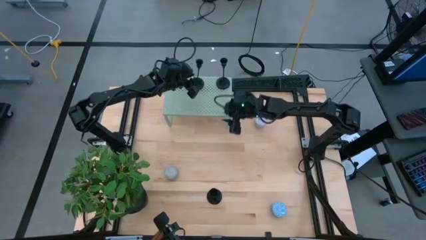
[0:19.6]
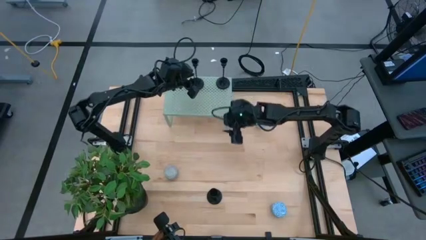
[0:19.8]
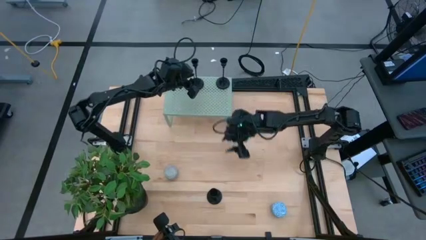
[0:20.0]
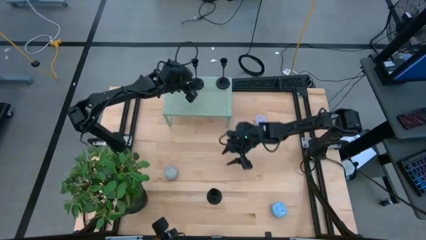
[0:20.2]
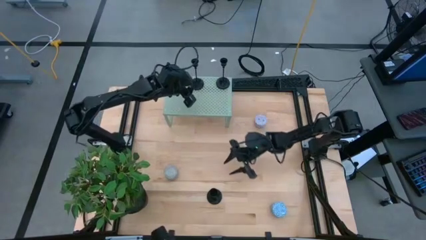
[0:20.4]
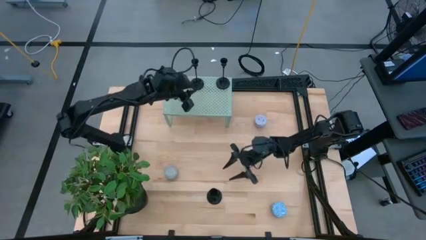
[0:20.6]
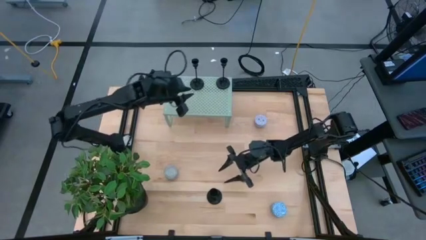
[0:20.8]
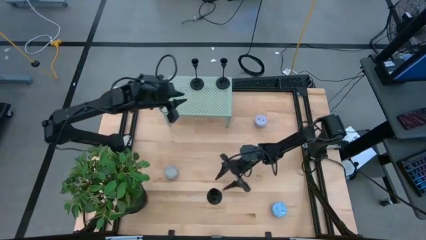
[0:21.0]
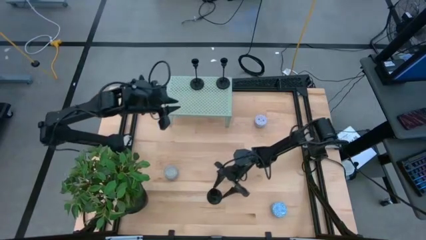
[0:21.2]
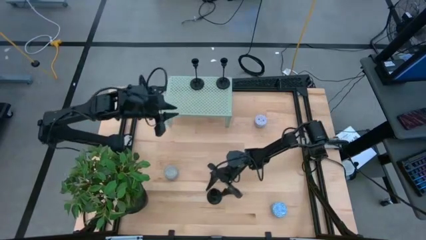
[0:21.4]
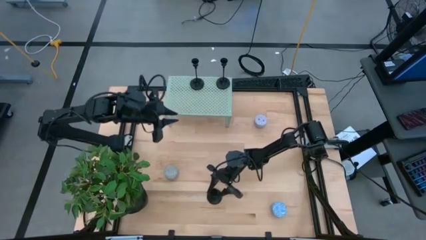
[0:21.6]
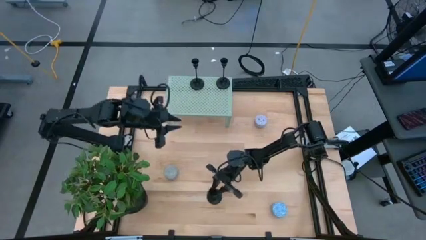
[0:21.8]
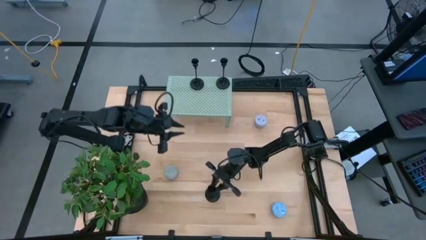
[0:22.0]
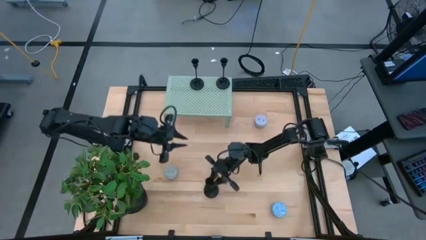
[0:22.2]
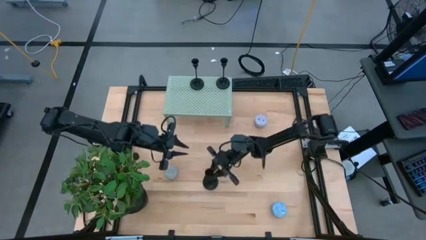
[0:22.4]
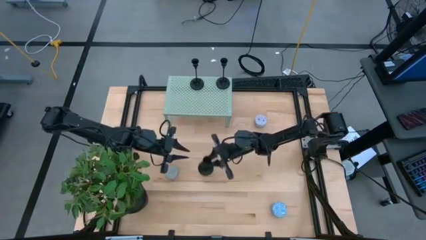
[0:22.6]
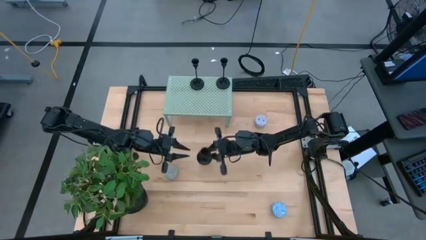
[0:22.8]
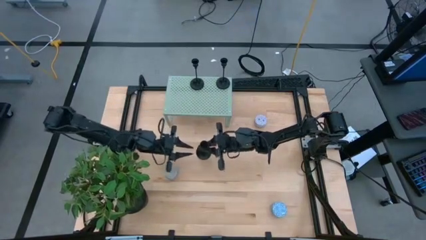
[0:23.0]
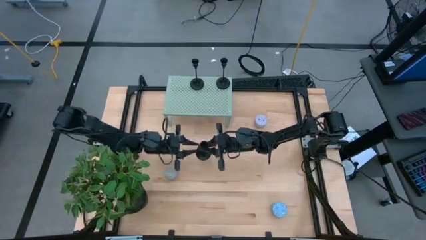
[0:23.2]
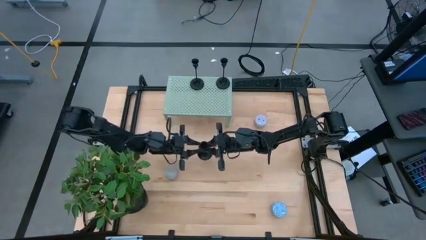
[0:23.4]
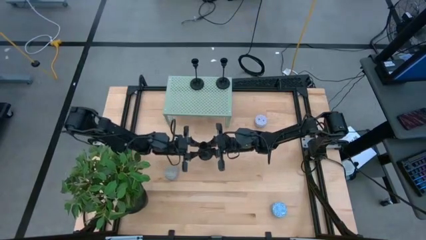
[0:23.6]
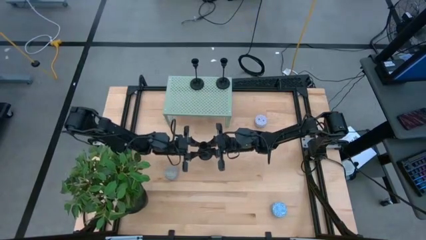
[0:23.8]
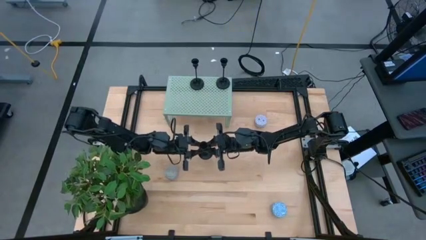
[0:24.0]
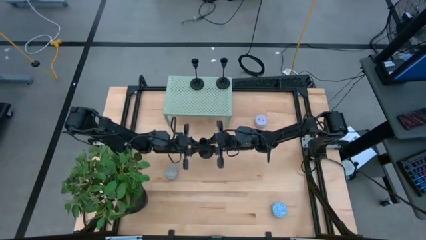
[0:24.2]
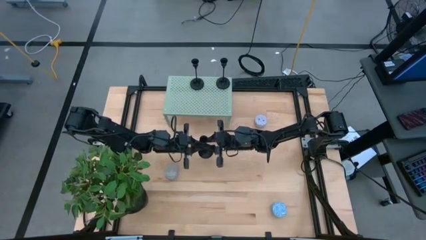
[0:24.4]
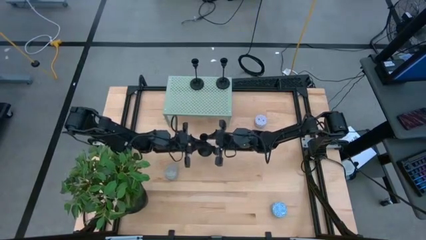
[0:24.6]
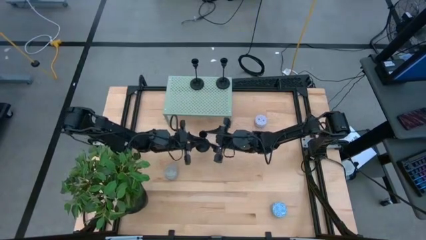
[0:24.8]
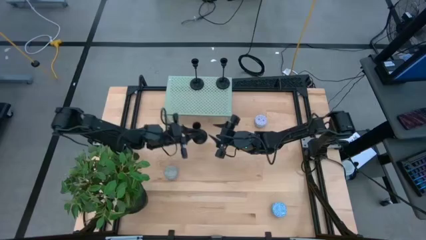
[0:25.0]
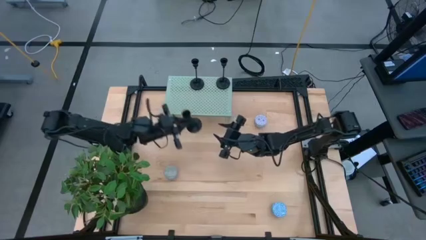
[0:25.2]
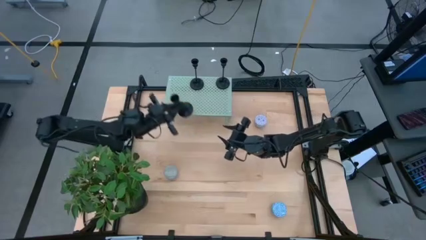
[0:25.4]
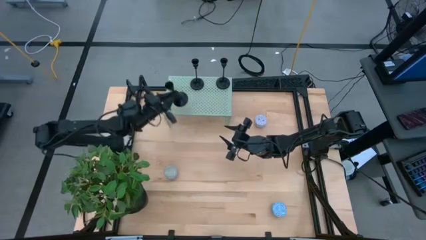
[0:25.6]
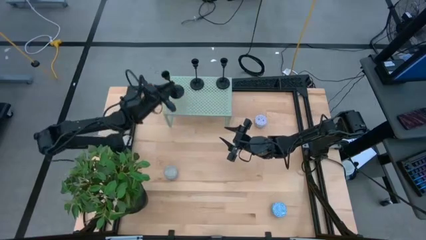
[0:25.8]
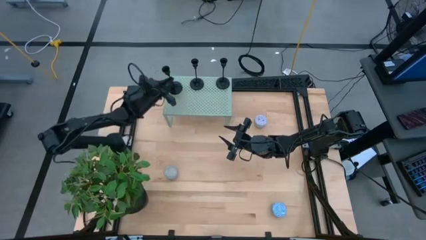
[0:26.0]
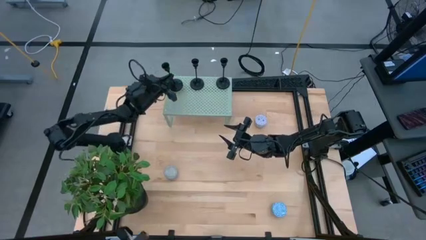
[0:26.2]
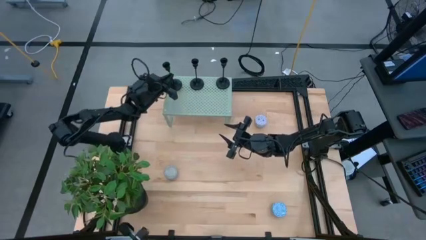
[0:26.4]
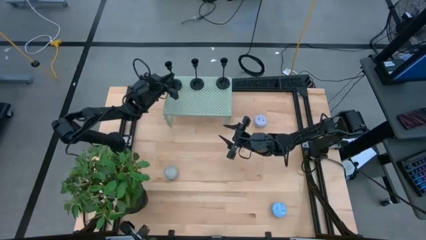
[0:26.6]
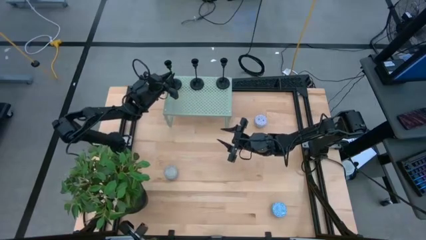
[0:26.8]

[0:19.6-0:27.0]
Task: Pick & Place candle stick holders
Put the black candle holder on the shelf

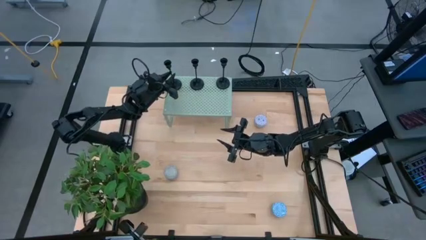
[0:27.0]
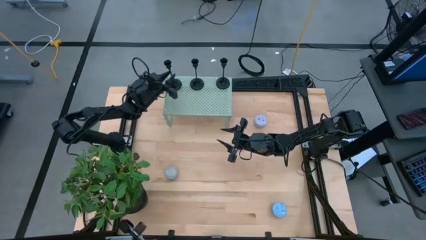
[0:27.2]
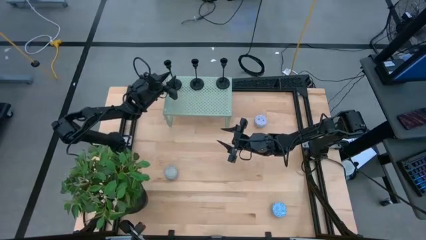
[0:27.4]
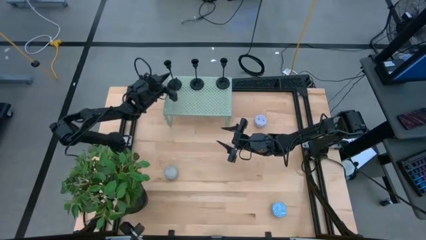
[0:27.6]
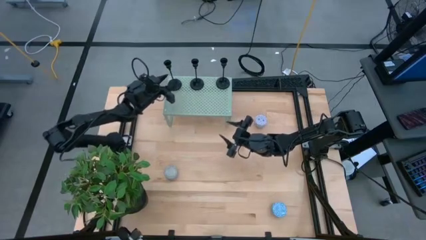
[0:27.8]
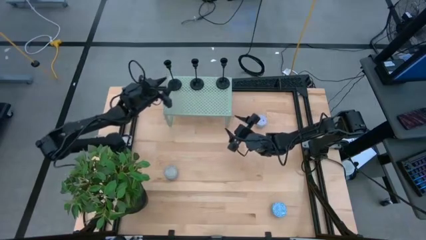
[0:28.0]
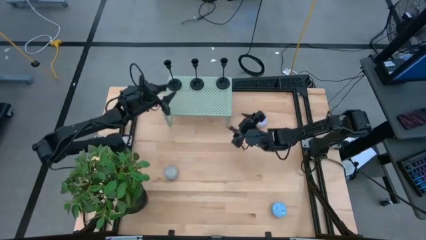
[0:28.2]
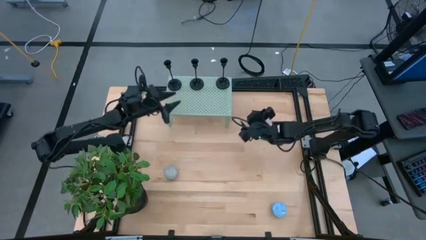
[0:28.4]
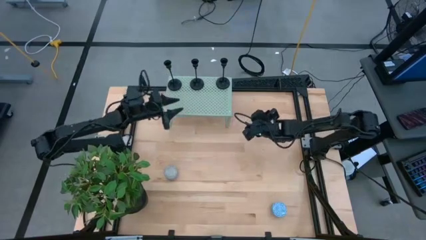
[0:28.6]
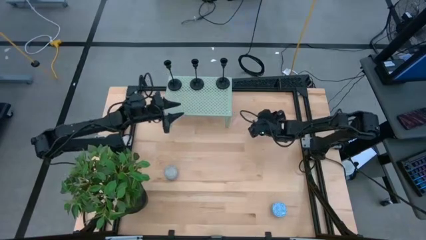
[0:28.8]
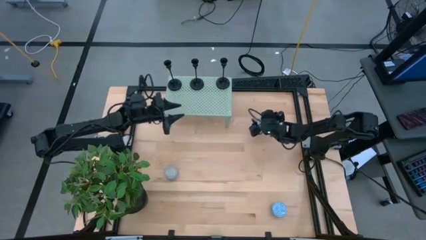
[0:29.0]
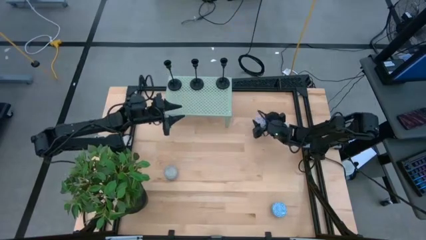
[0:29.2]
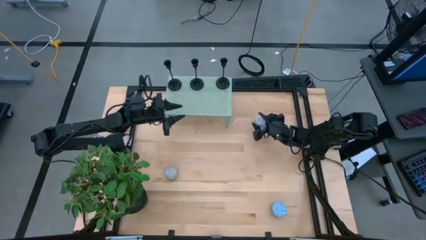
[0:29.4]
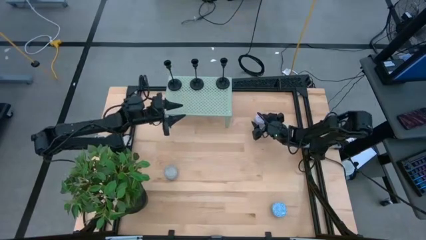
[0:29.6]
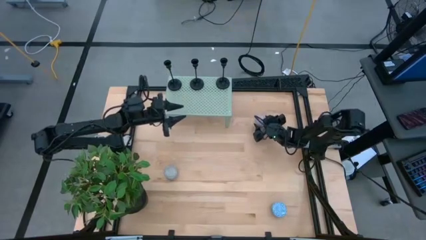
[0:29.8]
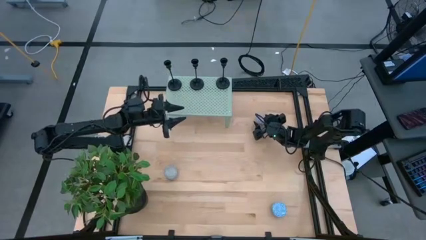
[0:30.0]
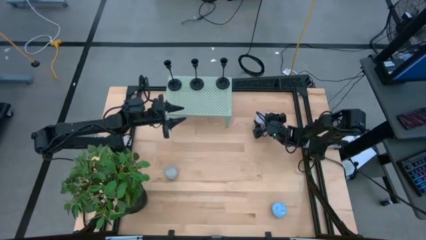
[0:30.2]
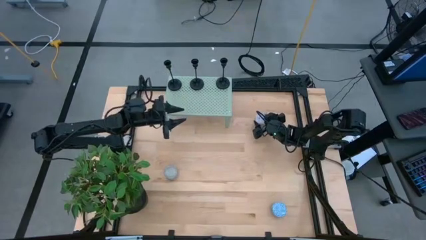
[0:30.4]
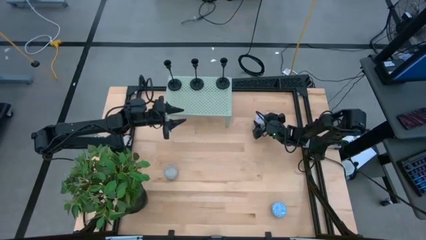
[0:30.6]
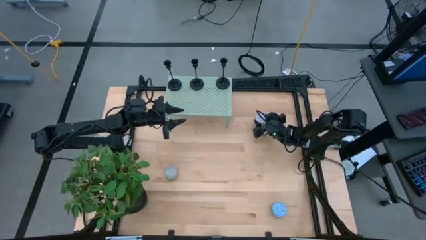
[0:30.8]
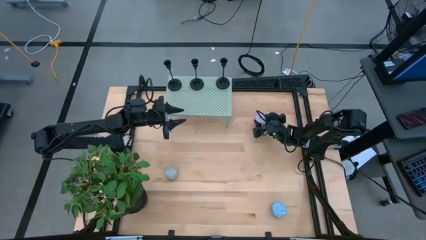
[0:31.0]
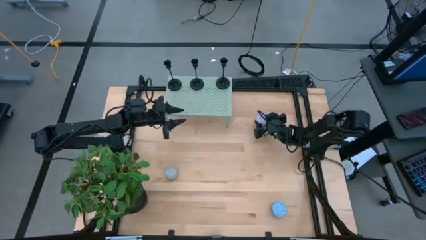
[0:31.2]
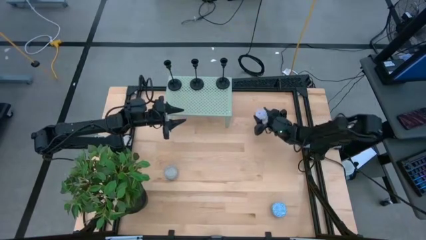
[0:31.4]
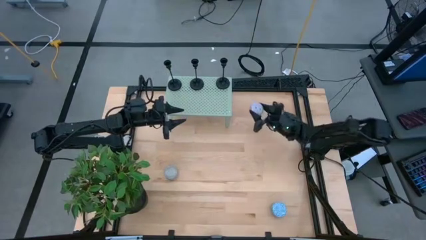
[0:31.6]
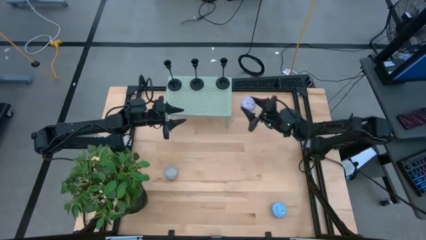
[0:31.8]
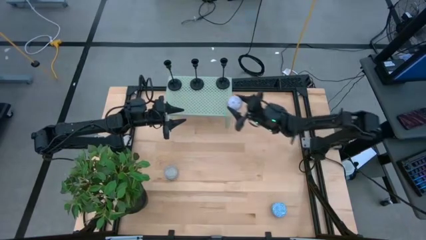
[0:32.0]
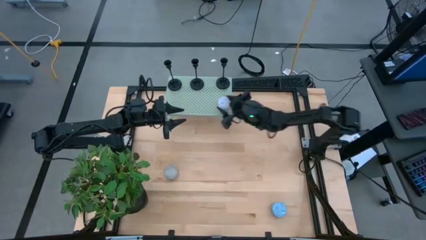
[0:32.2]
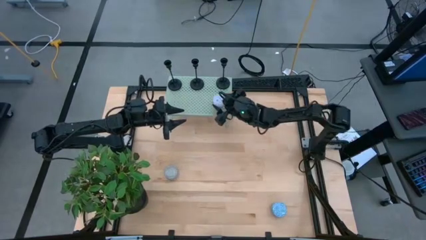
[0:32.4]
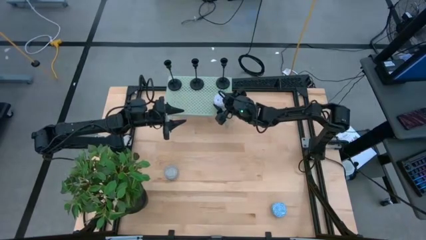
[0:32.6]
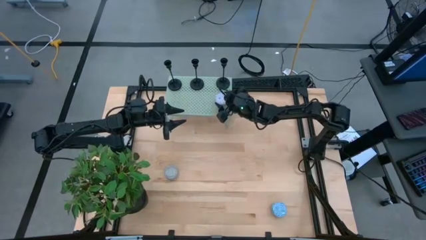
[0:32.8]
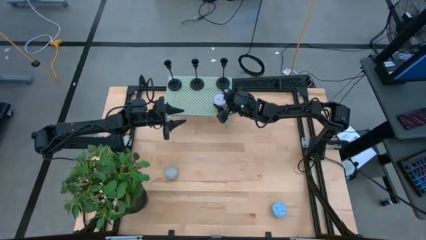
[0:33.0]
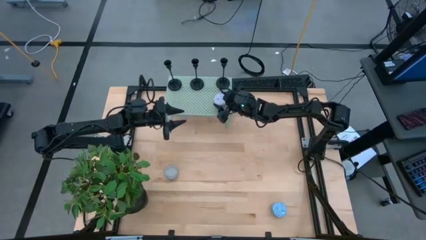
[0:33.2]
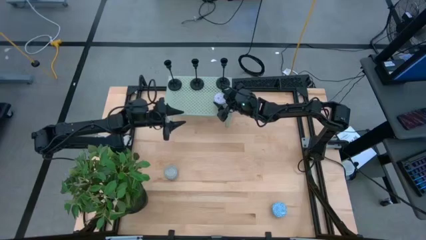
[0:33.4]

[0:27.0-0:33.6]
Put the top right red and white scented decorative candle on the shelf

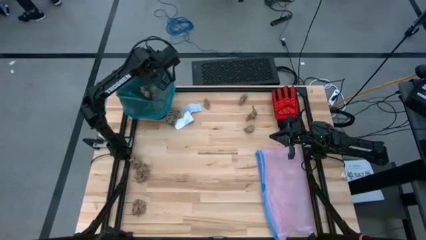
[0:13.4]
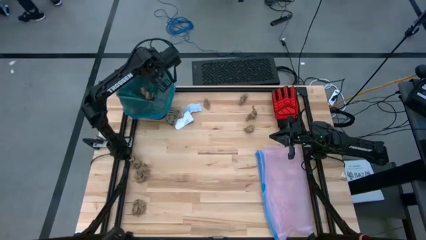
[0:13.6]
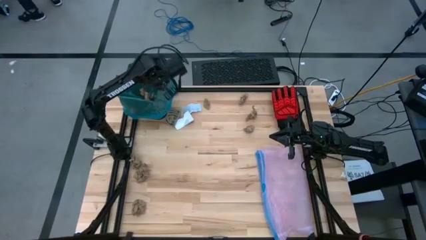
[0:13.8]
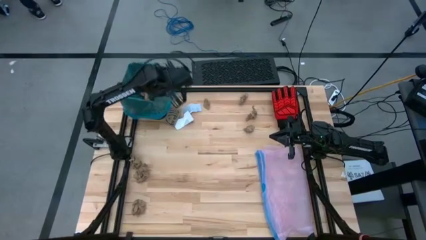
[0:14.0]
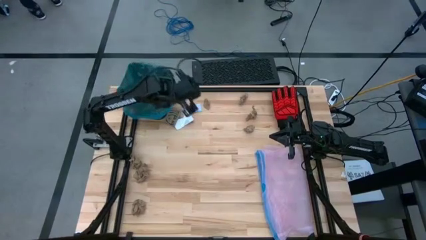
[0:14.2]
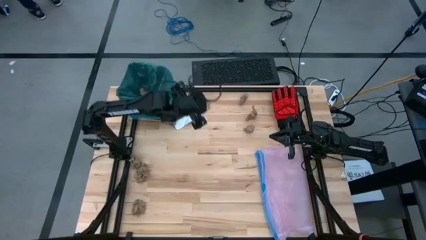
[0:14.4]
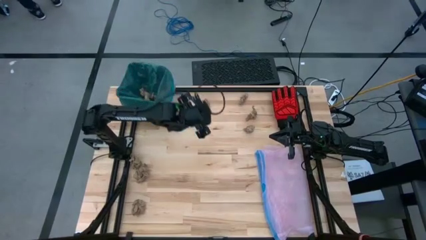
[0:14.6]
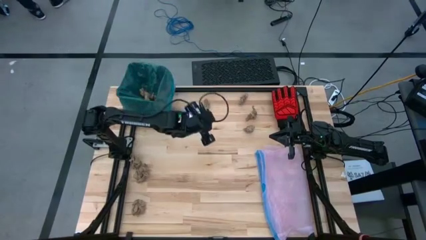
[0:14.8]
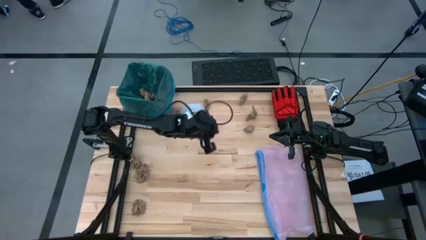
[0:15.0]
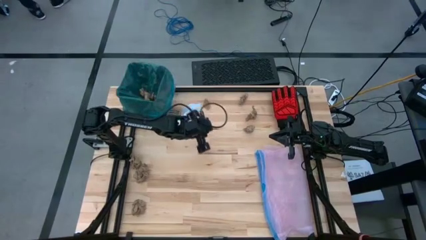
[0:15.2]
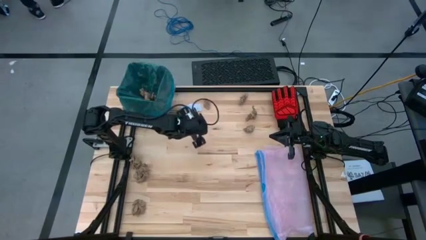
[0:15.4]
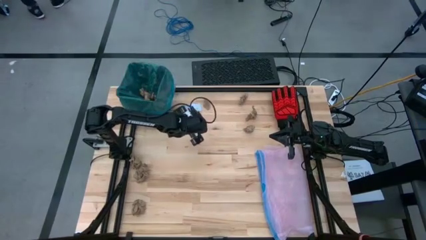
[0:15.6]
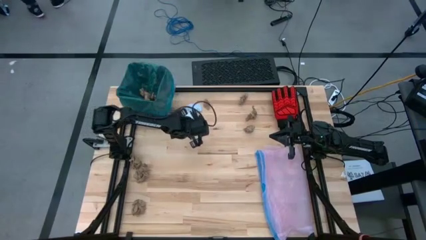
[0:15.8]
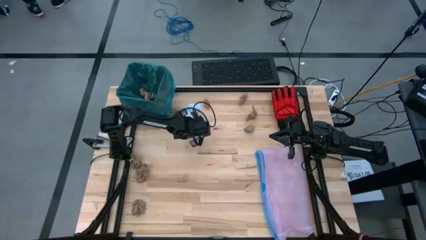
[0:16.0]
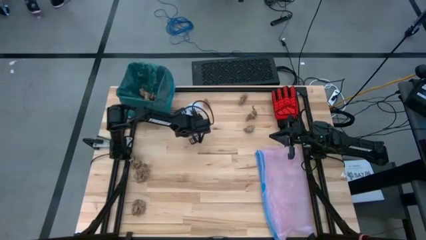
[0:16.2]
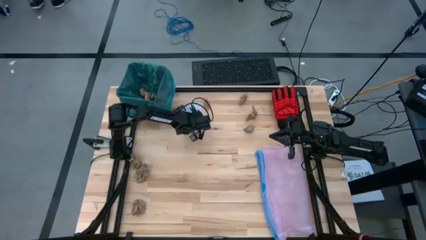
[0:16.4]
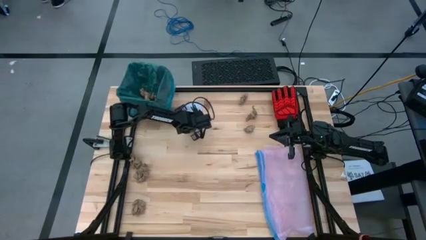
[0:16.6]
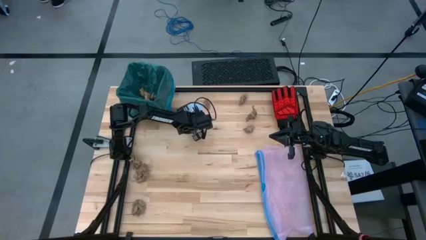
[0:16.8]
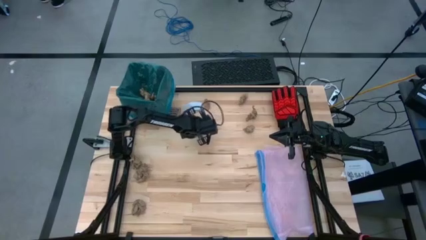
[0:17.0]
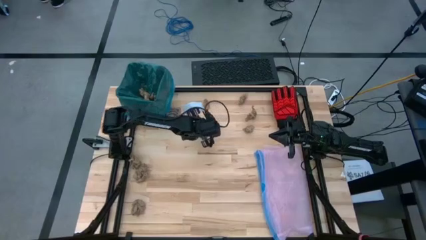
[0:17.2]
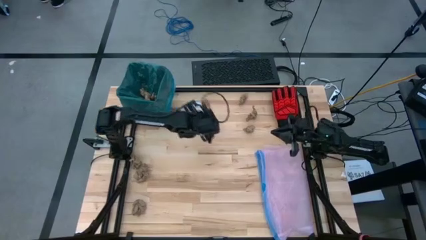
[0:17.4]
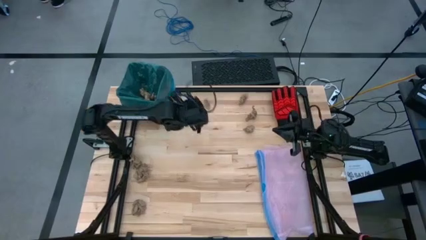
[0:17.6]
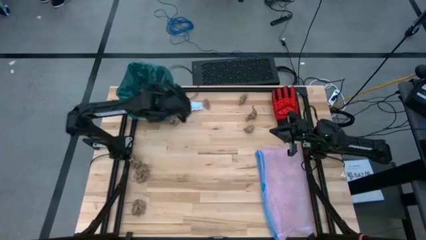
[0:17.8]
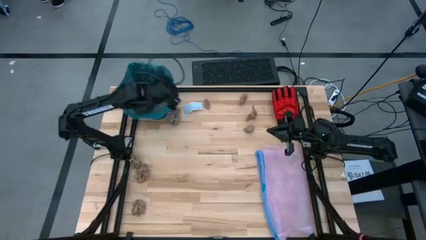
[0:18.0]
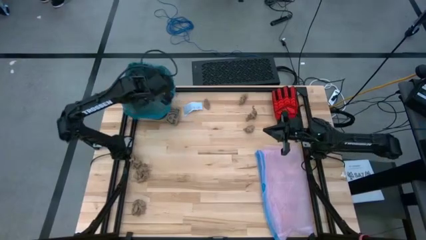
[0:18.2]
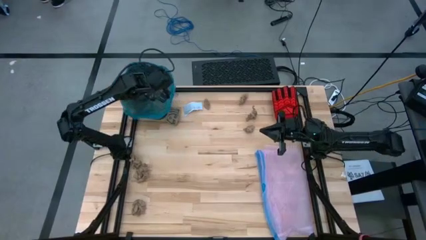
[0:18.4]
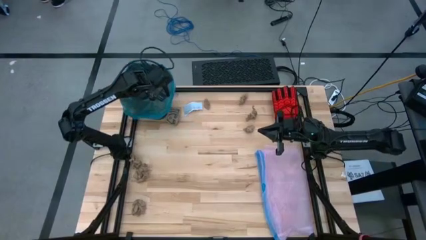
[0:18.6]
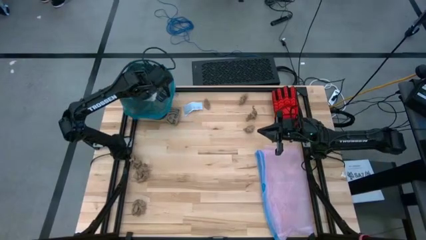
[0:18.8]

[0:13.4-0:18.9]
Task: place trash/remove bag and relplace
Put the white paper into the black trash bin
